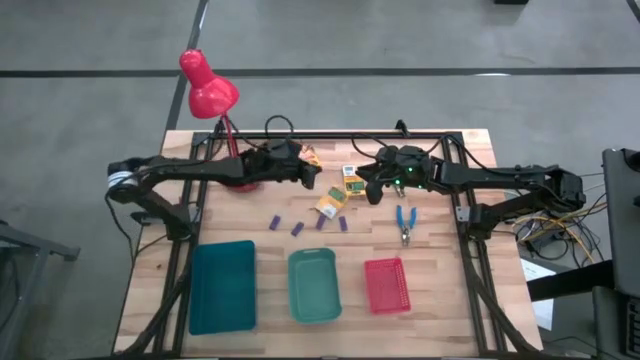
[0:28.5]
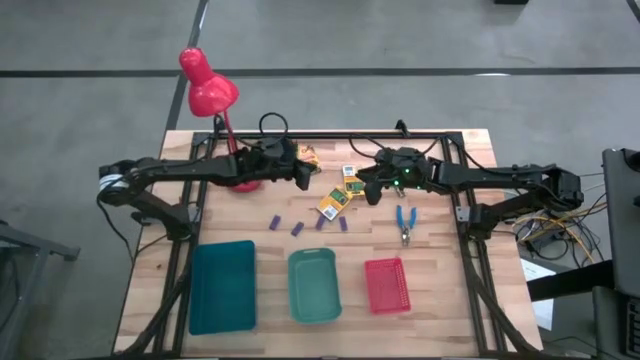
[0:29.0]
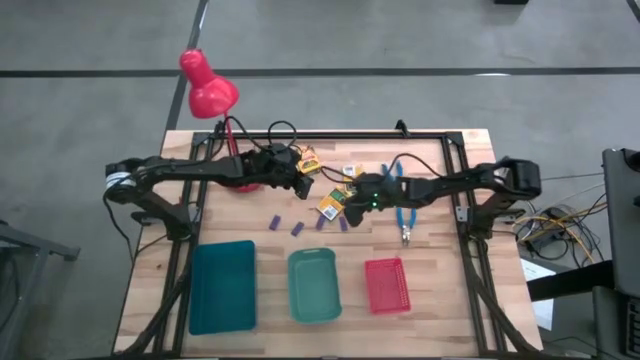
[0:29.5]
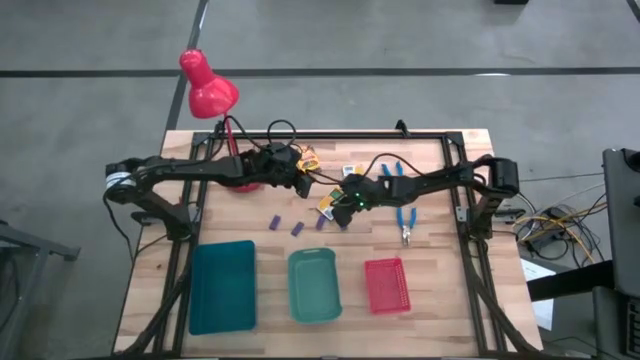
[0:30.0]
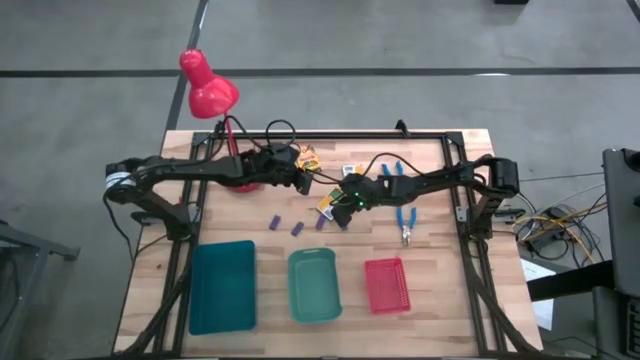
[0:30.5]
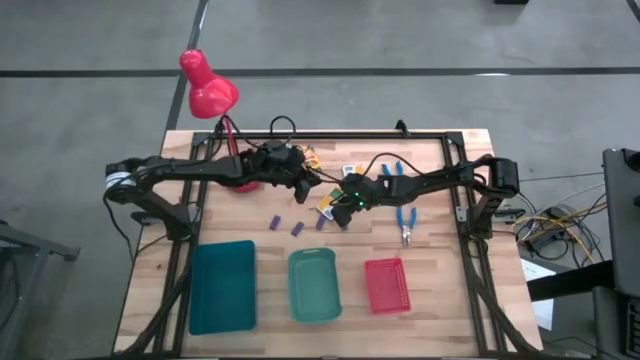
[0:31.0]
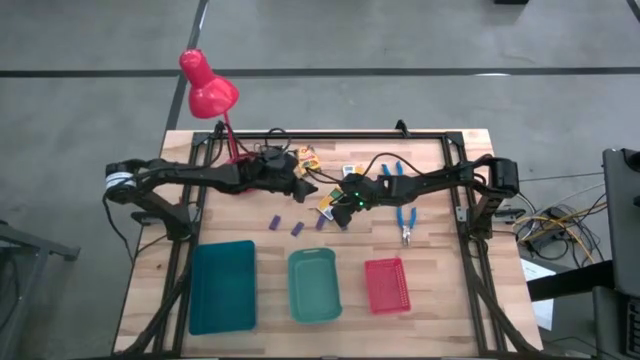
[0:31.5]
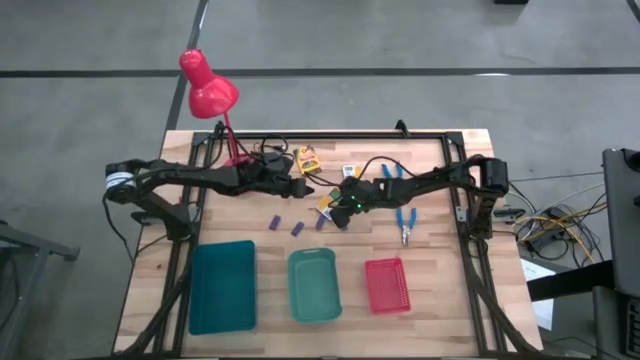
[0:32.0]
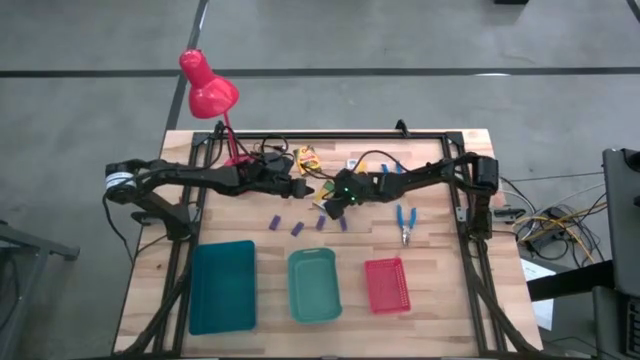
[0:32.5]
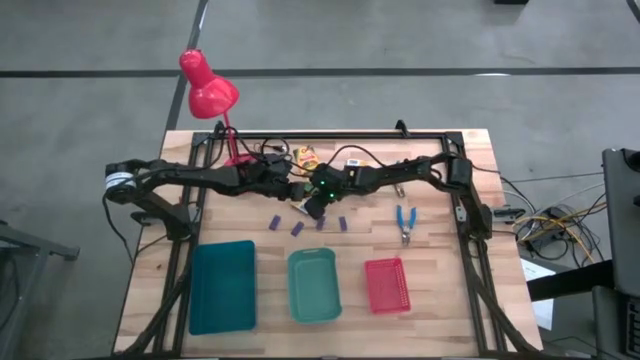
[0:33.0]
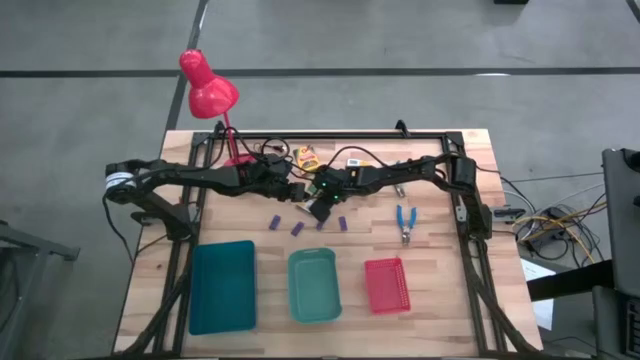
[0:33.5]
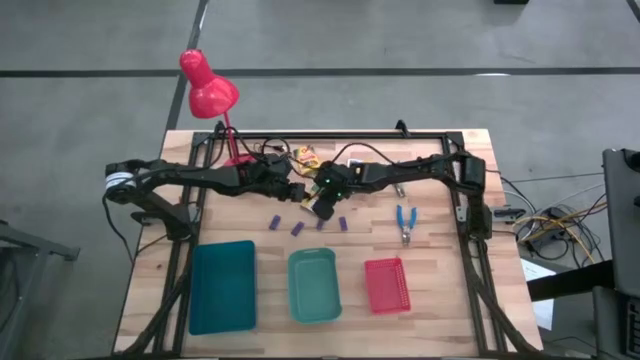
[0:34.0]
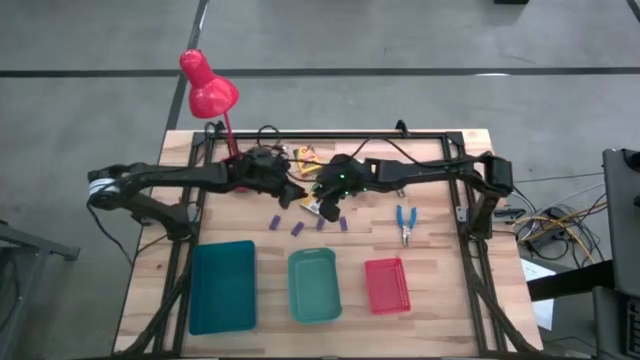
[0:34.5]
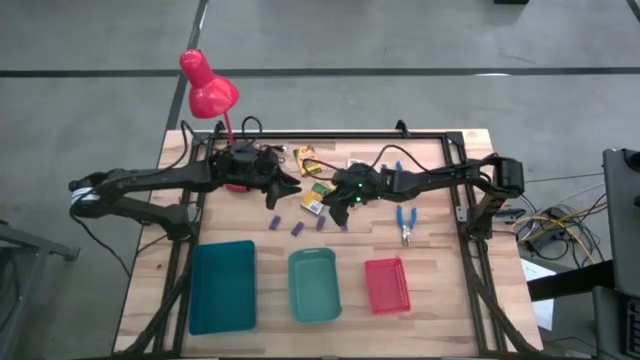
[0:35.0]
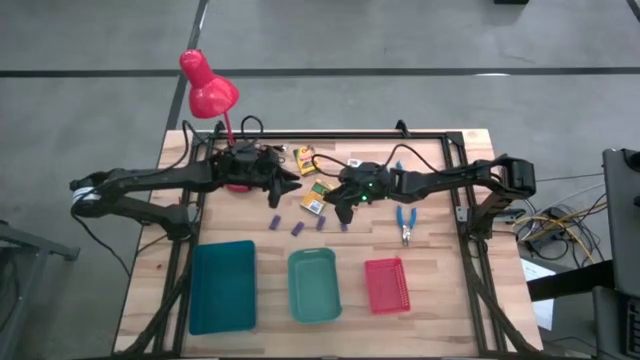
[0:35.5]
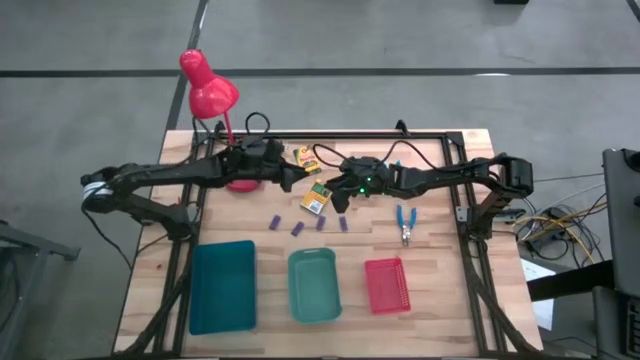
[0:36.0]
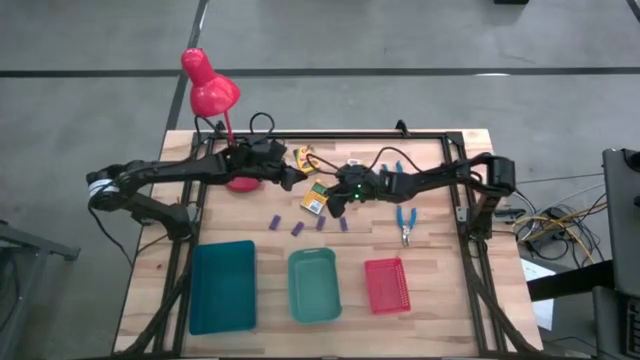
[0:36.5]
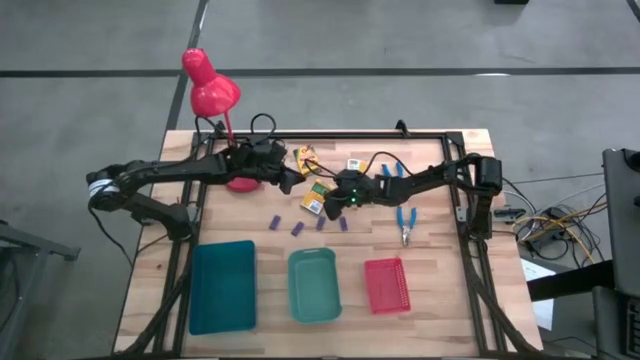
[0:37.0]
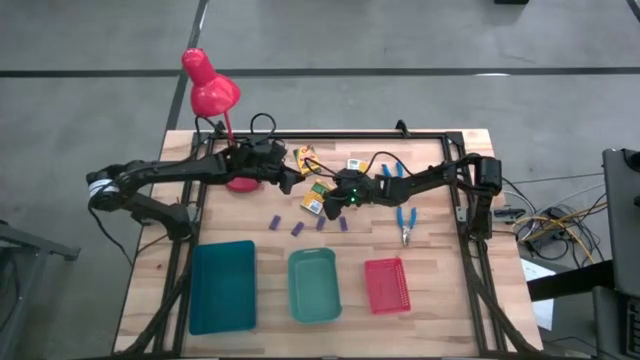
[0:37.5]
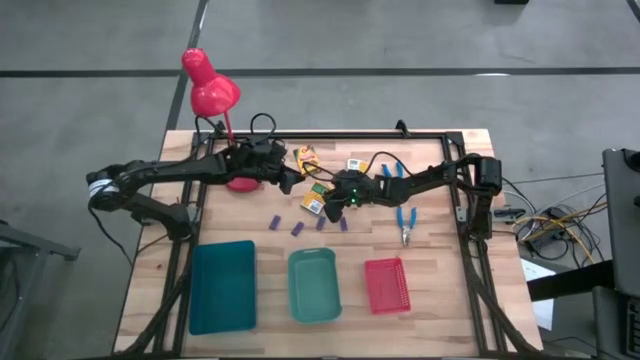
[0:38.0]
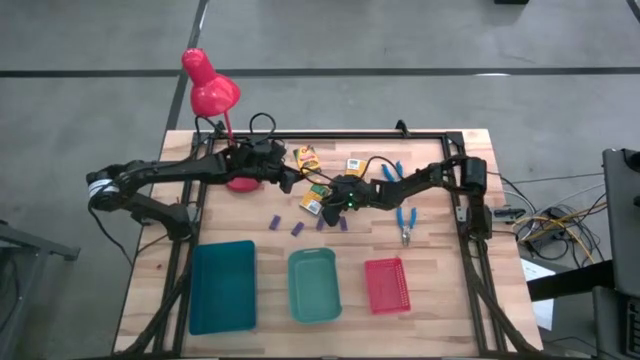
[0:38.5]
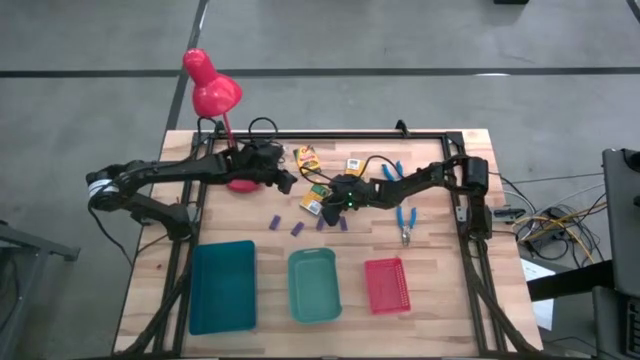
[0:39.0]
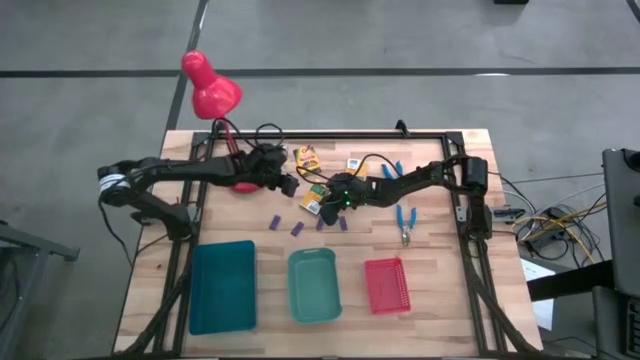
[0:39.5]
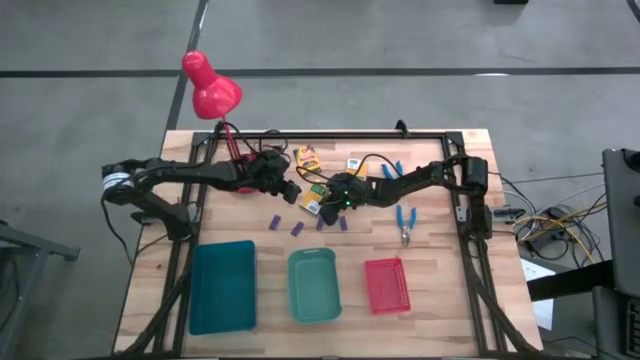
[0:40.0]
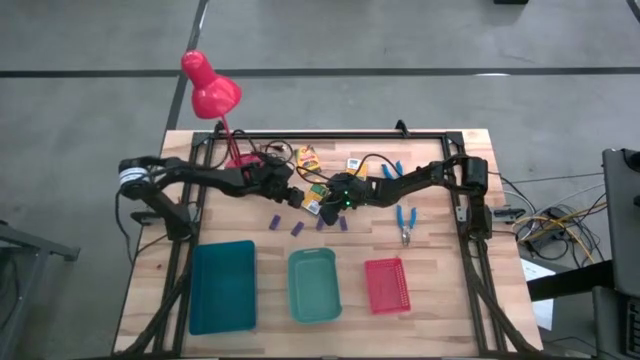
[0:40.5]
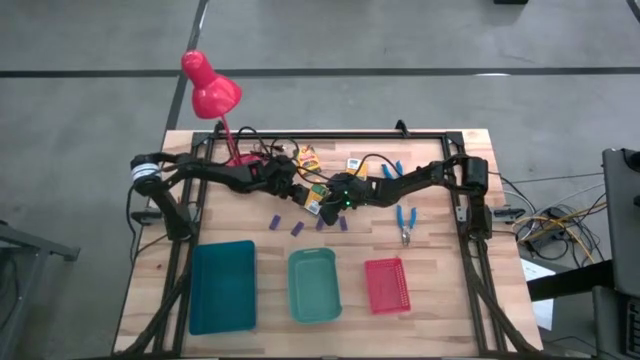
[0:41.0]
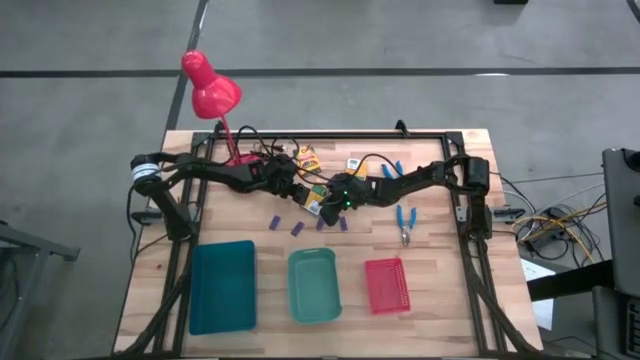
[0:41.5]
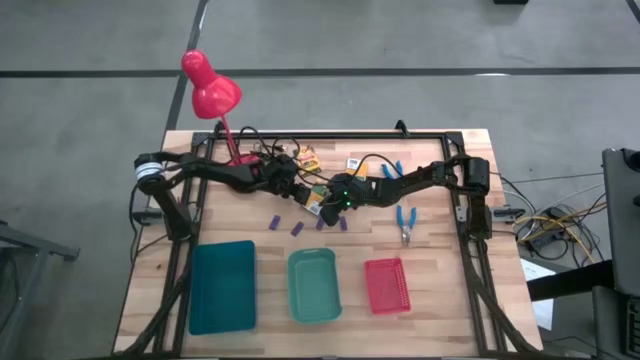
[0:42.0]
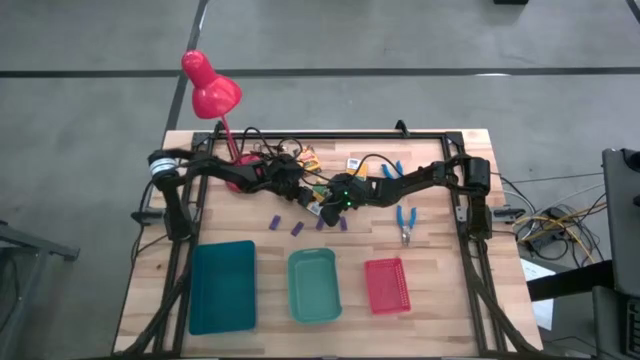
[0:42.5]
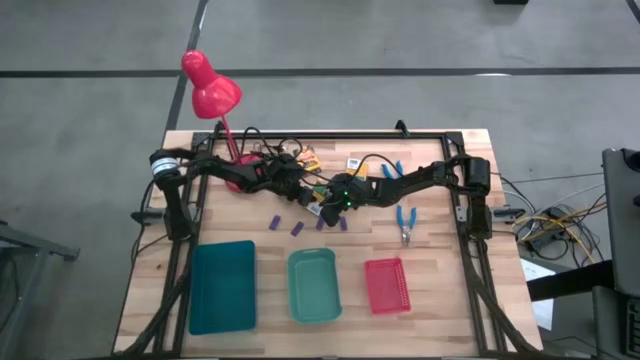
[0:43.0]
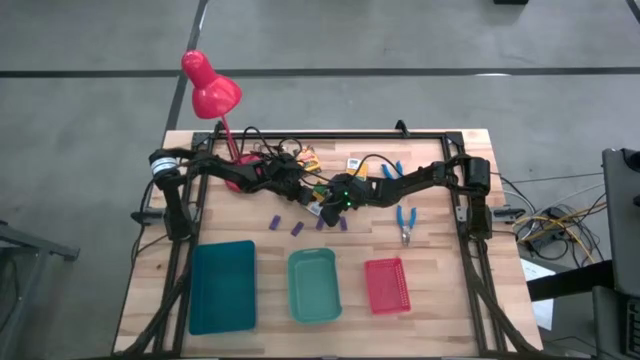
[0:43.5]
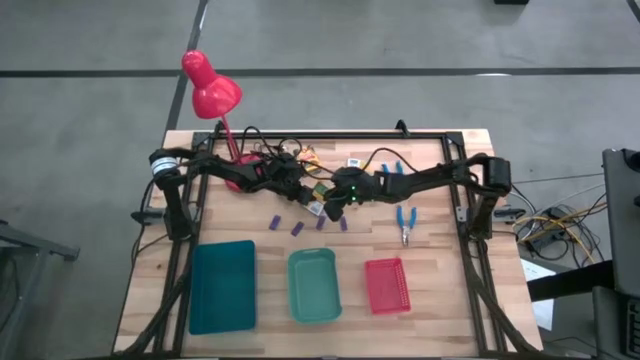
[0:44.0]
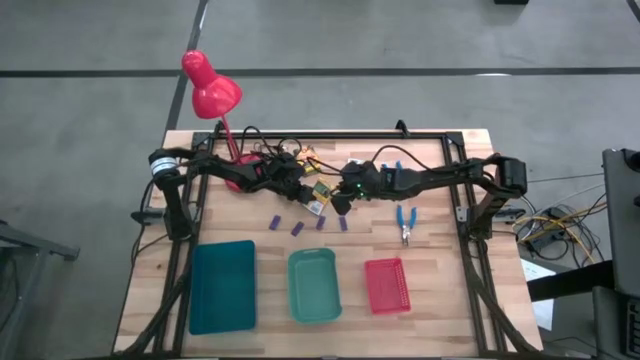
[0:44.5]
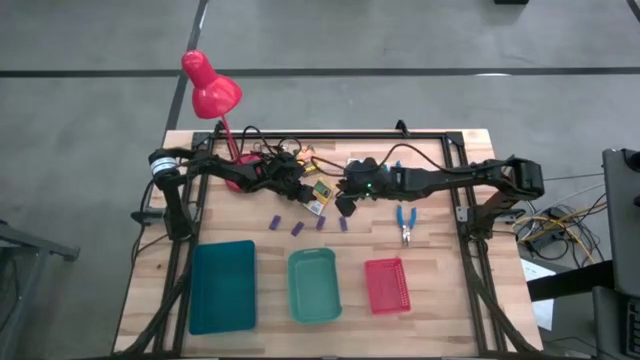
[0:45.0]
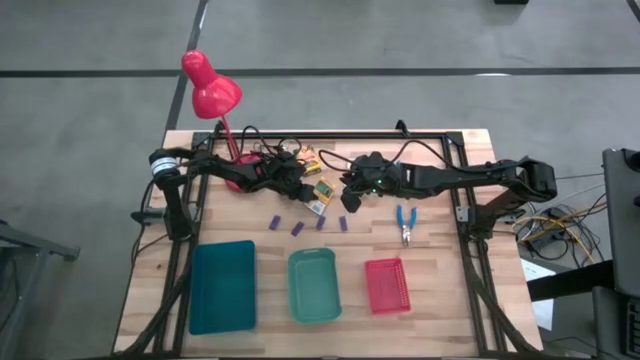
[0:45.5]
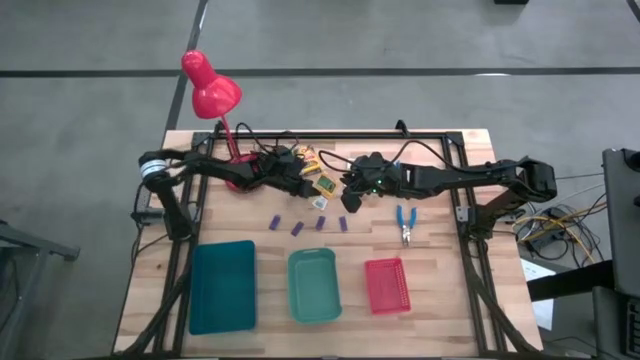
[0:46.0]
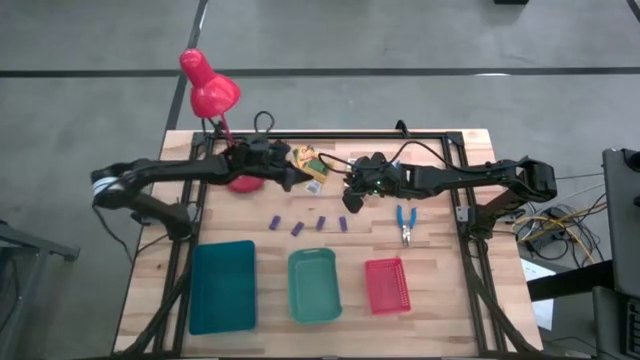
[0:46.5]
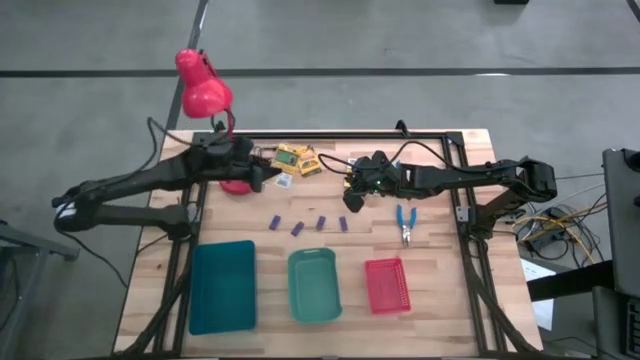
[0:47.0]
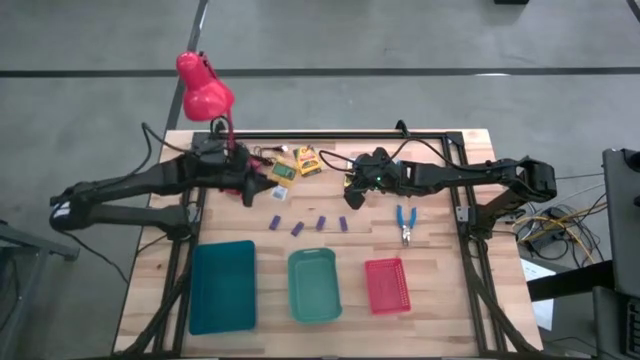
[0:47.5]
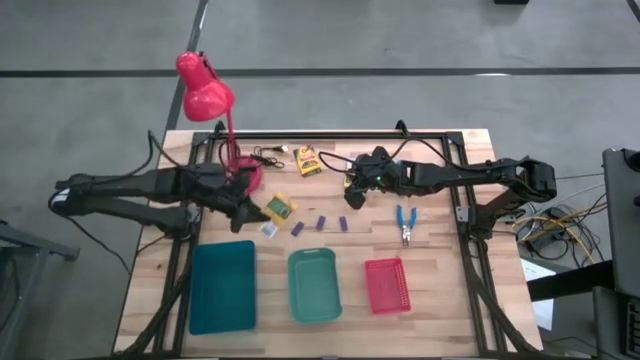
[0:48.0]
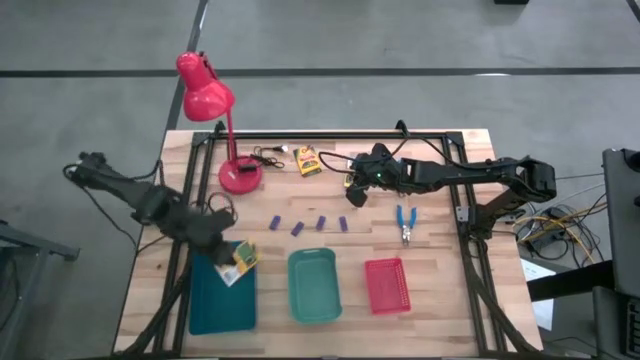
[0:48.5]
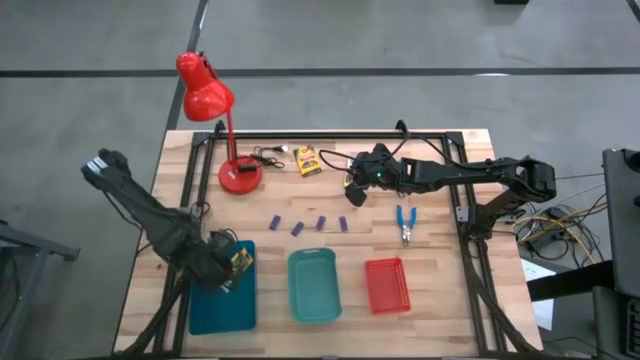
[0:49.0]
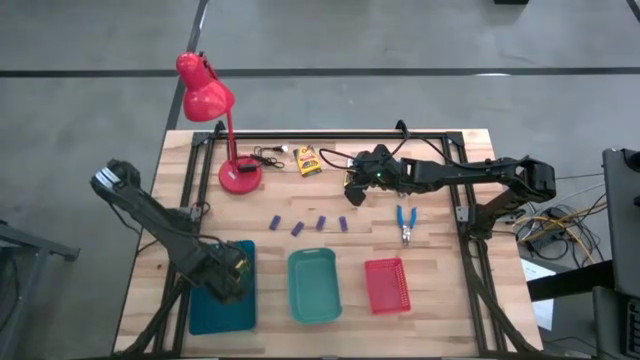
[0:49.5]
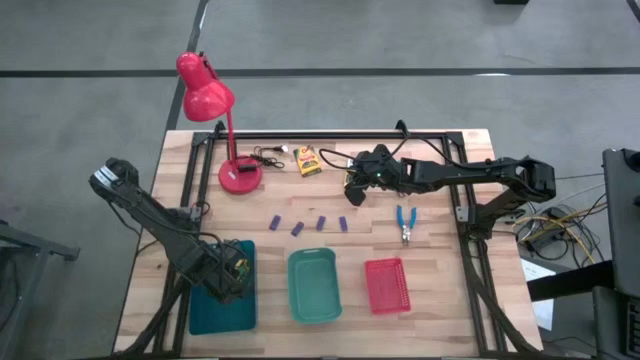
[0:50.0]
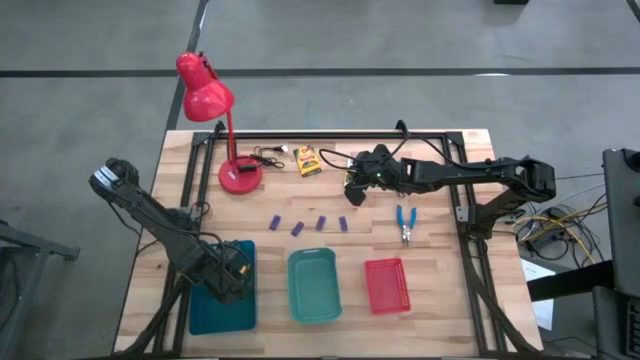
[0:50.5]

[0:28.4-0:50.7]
Task: Pick & Place School Supplies
Put the crayon box into the blue bin
